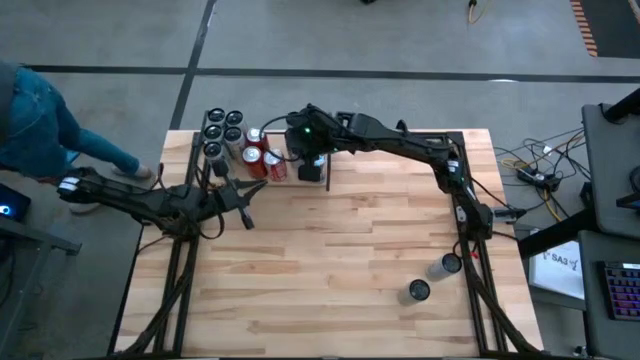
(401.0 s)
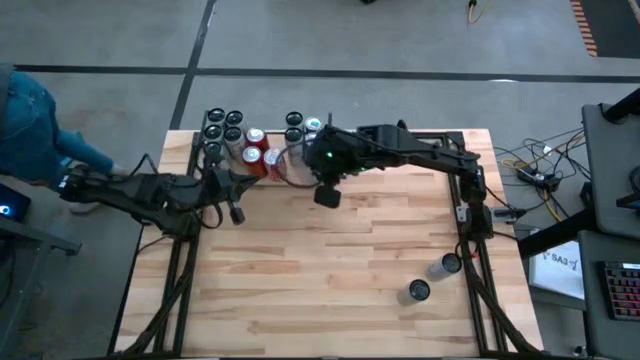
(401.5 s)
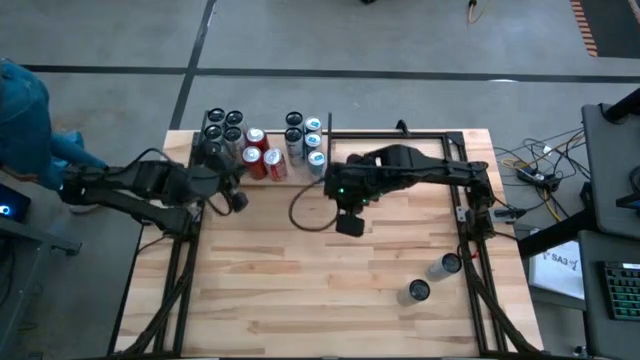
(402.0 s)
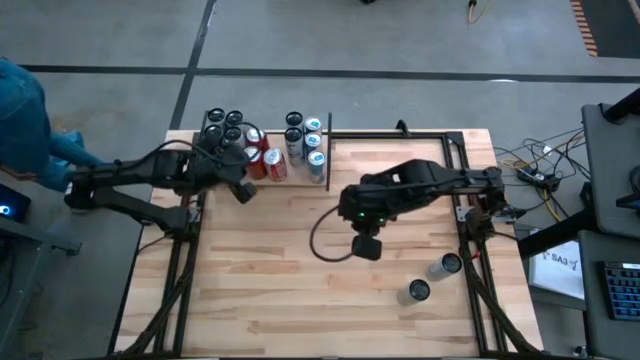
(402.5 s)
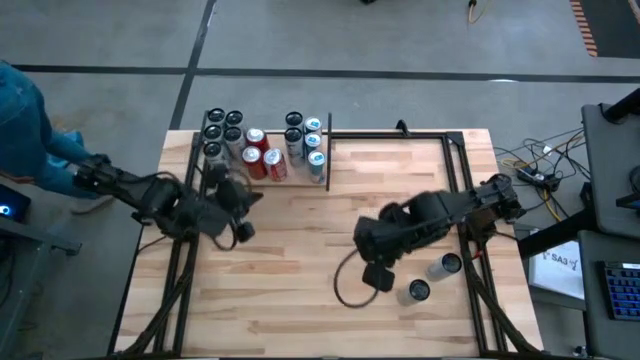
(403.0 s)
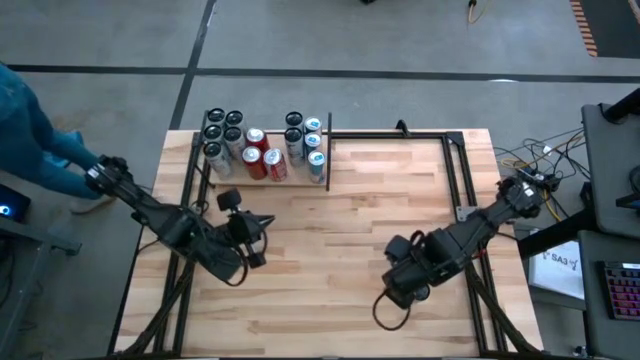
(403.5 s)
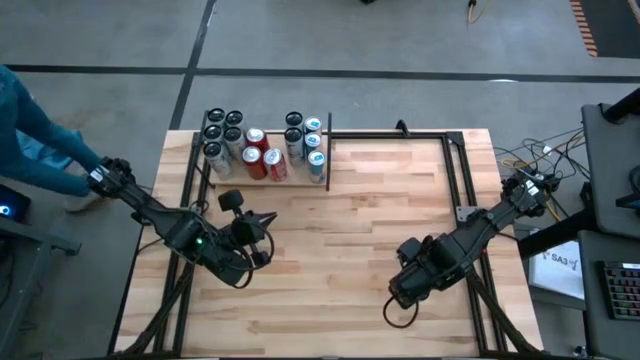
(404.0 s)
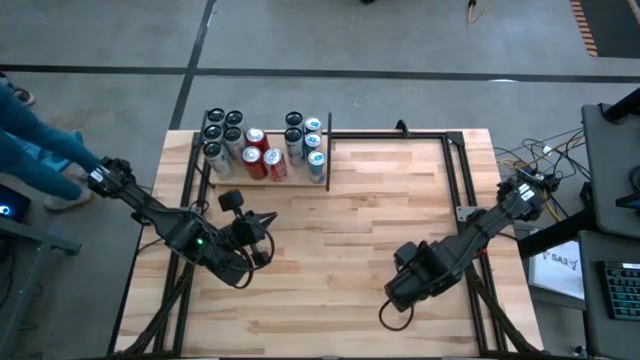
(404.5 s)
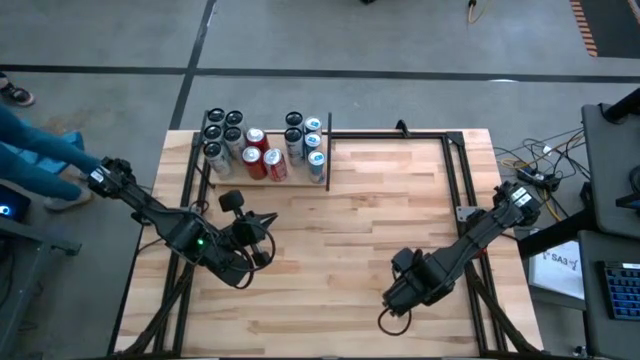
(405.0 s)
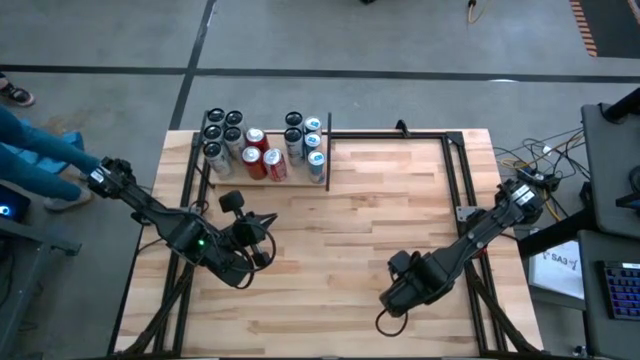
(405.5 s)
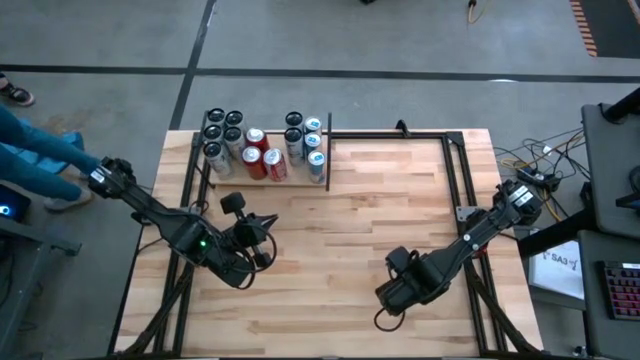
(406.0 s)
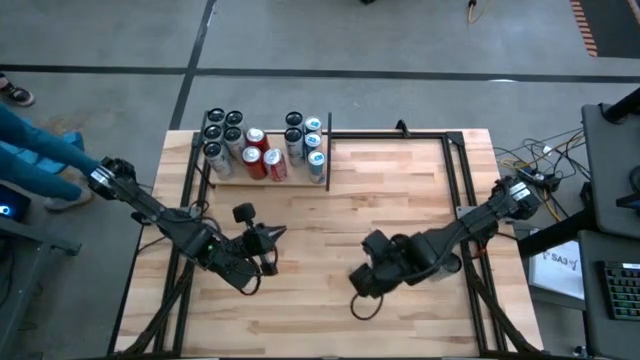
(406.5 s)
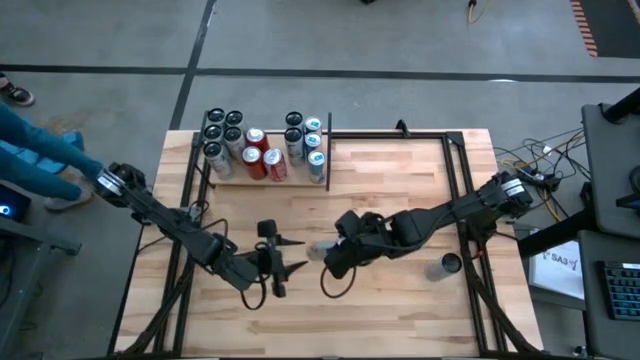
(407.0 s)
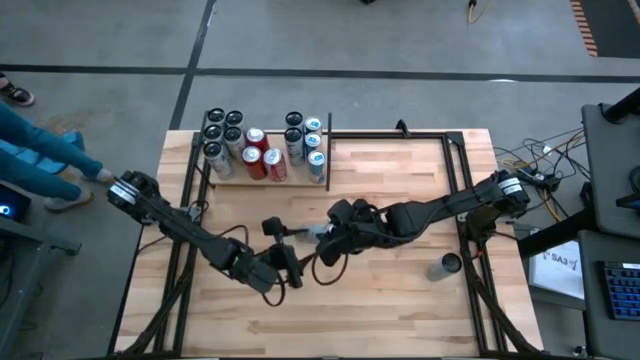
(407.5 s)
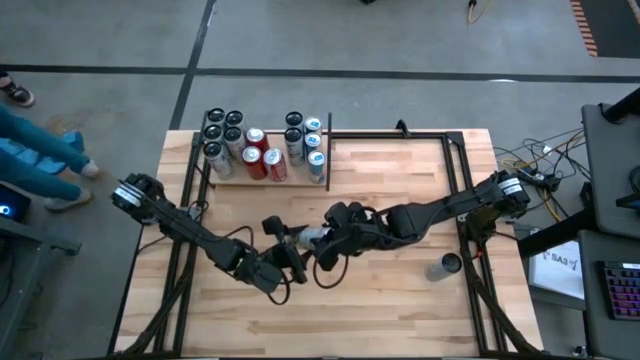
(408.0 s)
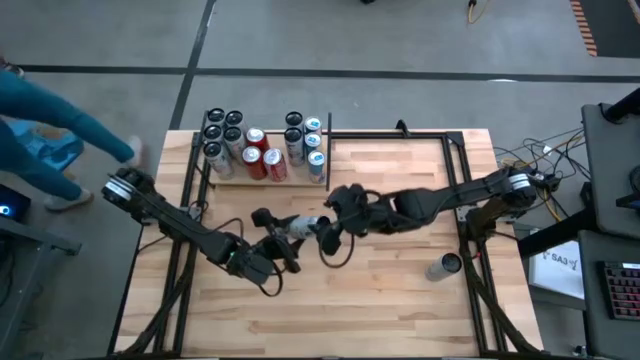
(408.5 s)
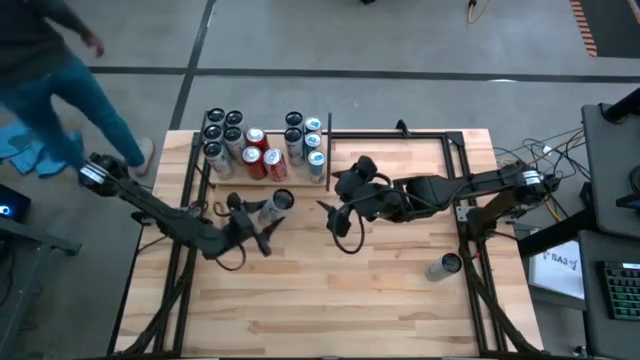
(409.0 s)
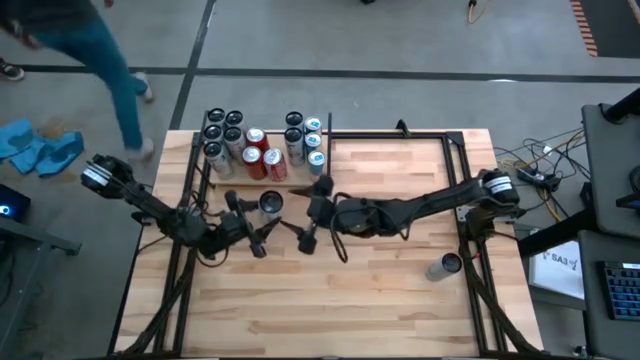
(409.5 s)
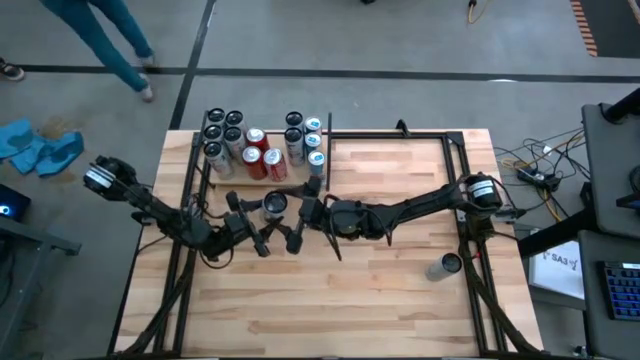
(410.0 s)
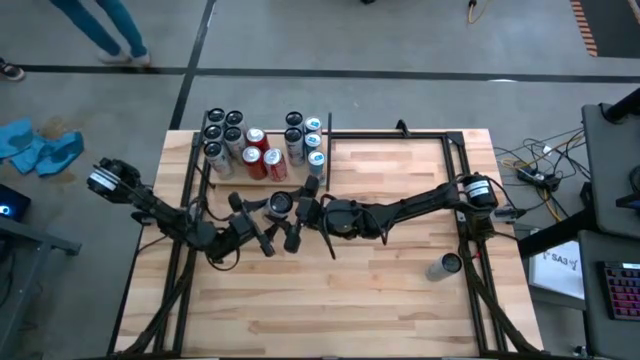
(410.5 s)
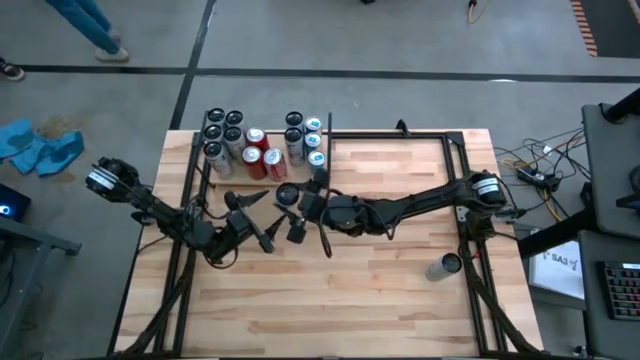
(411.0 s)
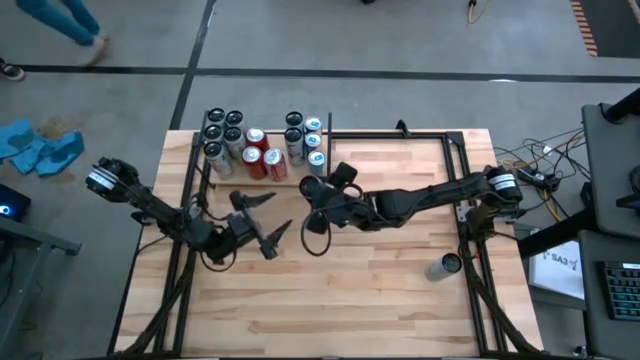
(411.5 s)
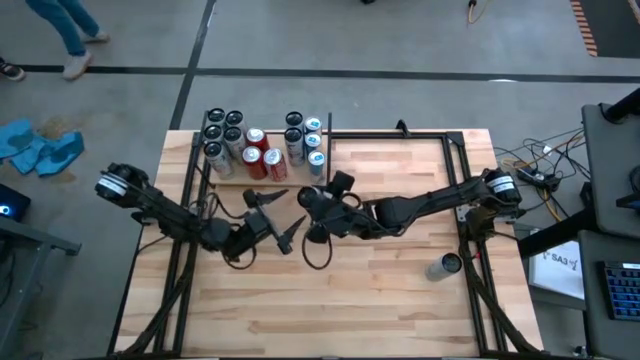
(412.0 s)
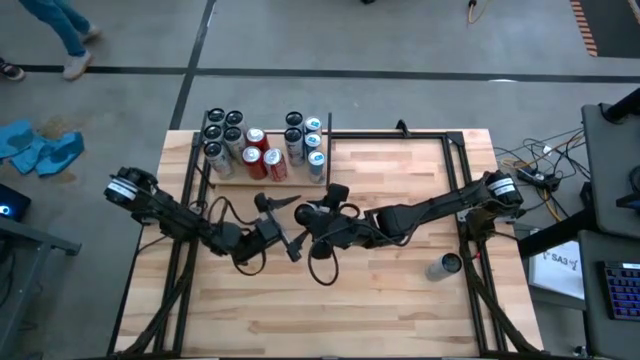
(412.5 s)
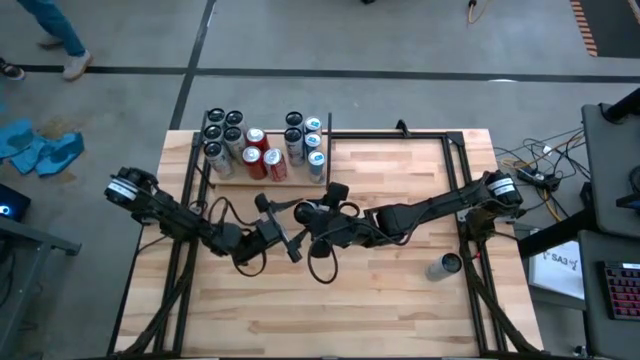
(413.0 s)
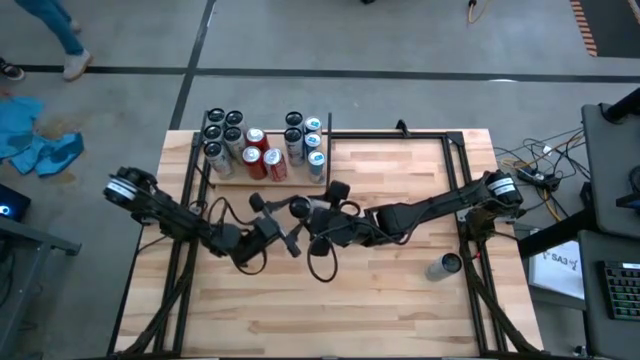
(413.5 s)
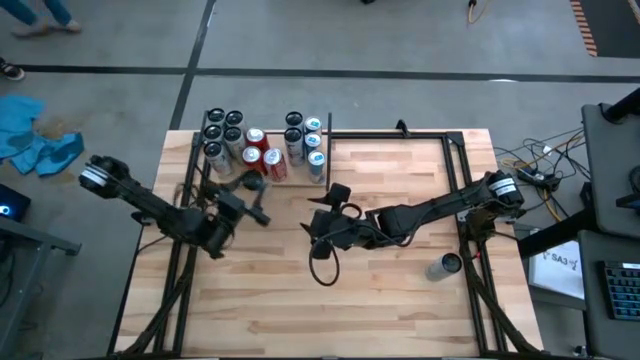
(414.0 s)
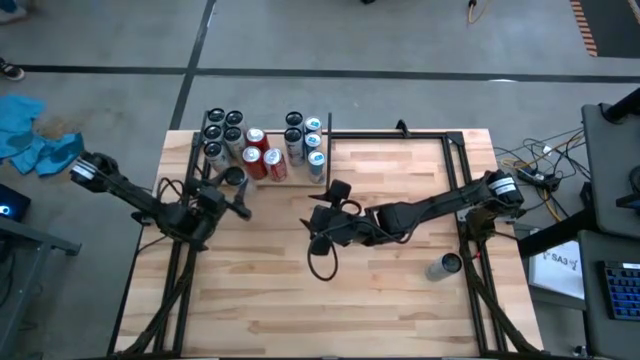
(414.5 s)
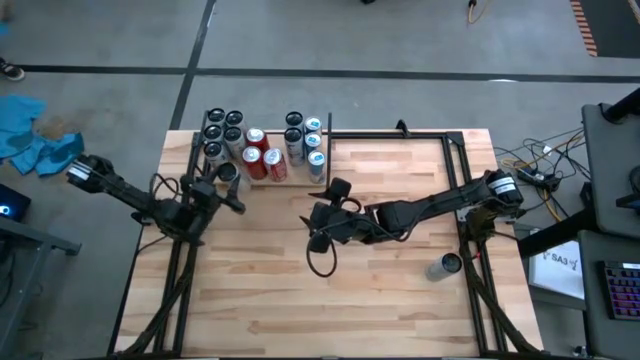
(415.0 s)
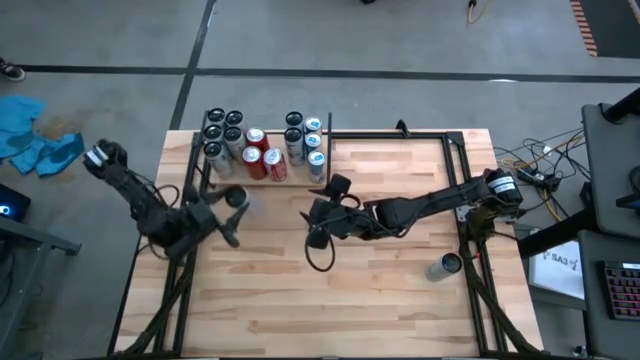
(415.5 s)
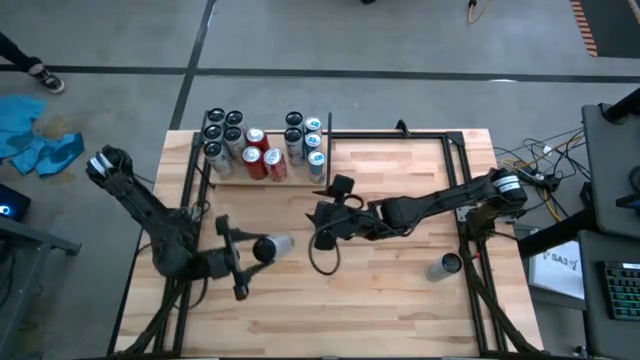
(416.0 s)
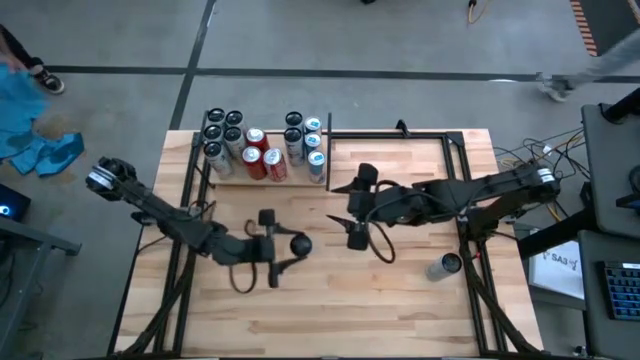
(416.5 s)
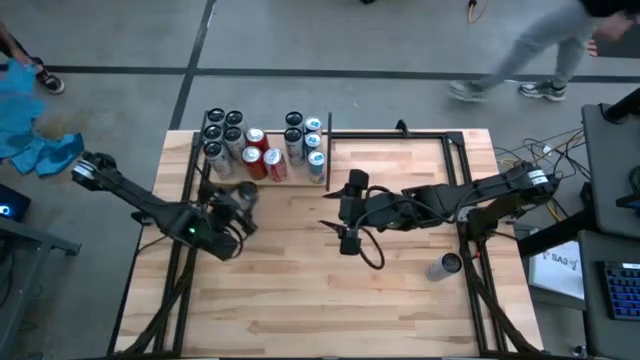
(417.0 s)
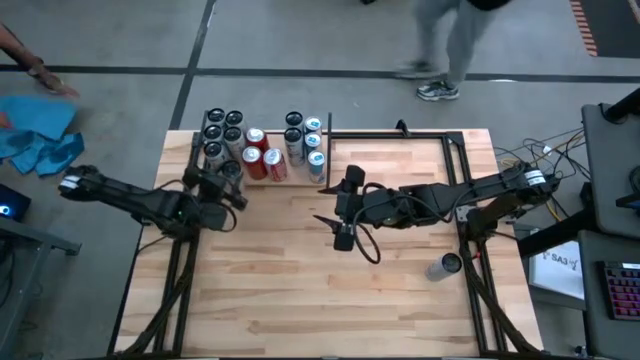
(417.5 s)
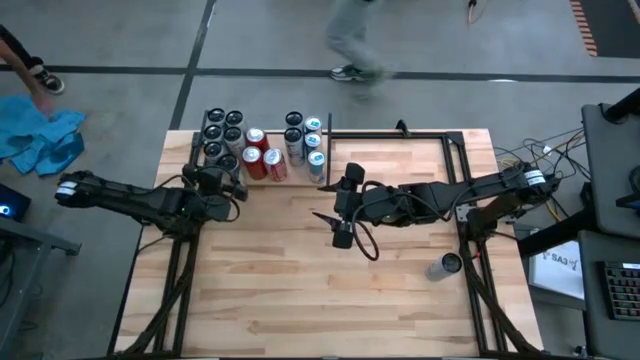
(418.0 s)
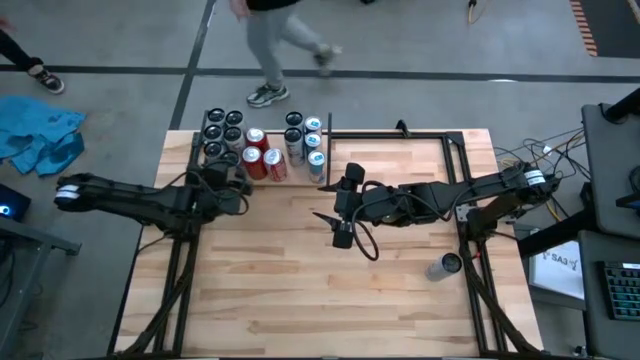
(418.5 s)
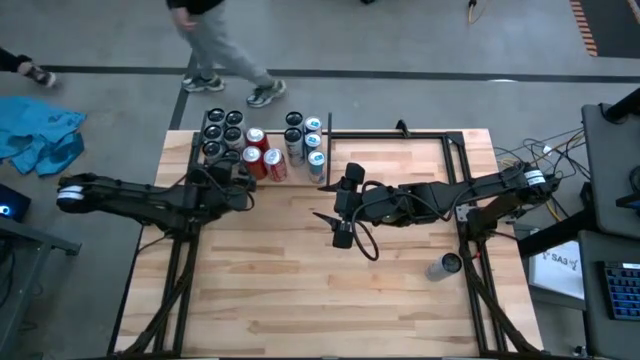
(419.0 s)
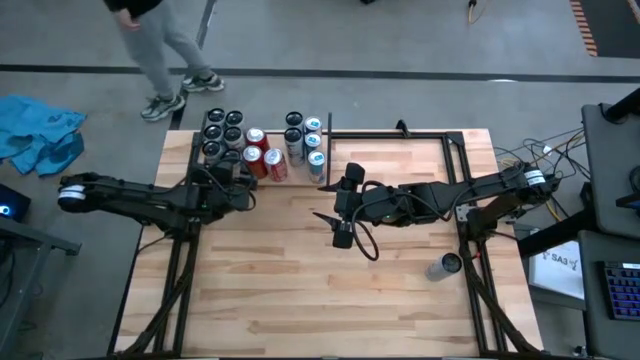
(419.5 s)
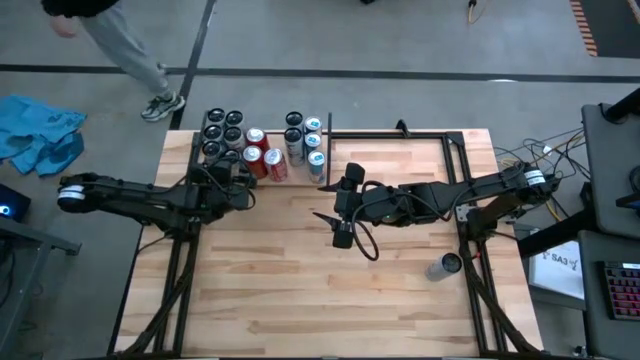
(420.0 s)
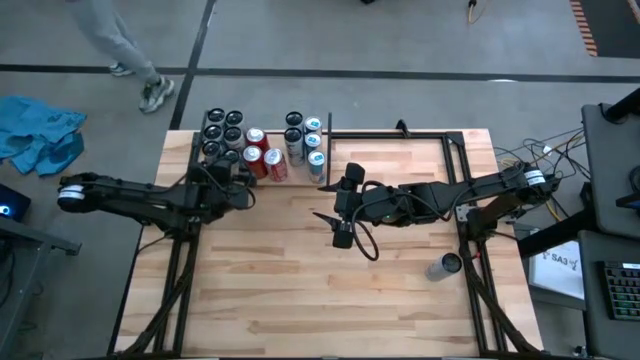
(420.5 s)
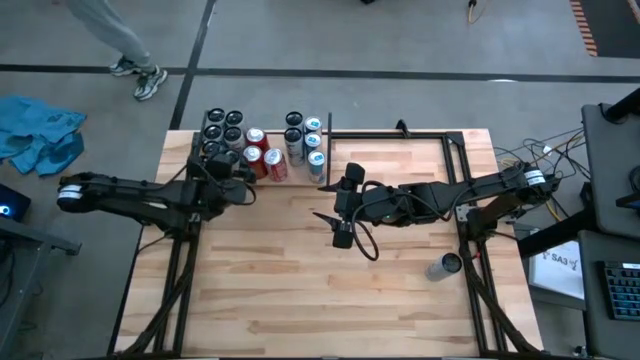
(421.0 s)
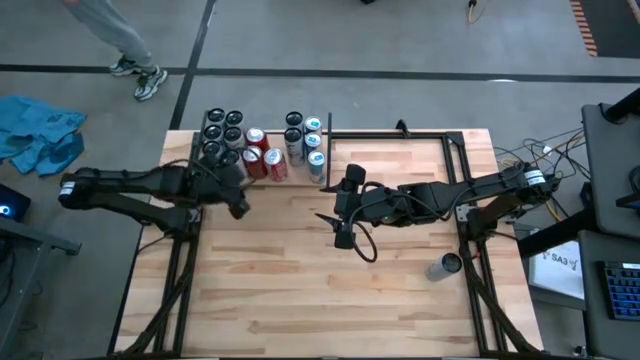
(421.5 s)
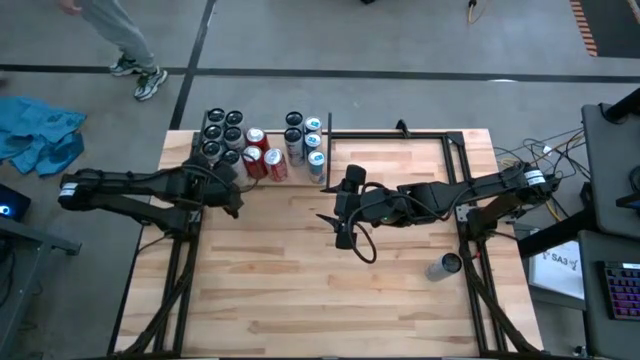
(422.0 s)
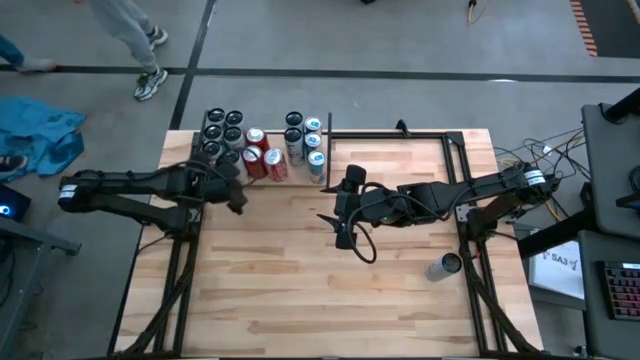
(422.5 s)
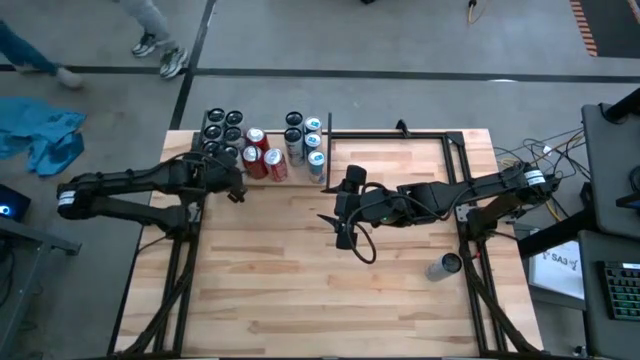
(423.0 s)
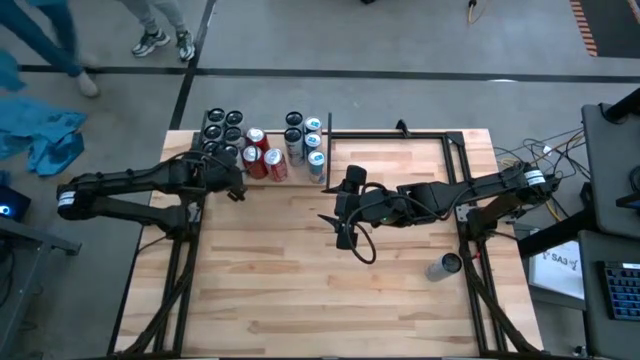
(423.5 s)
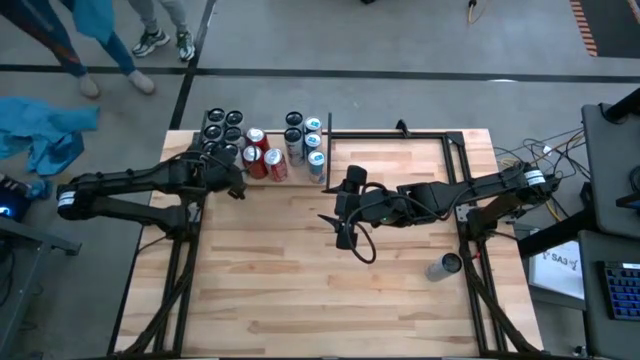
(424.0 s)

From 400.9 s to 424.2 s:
Task: Place canned beverage on shelf
Put the white and yellow soda can on the shelf aligned with the other white and yellow soda cans
